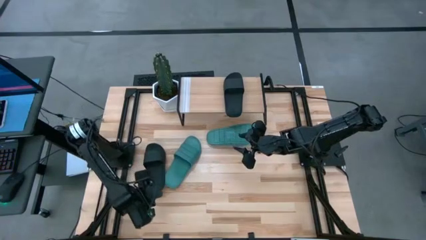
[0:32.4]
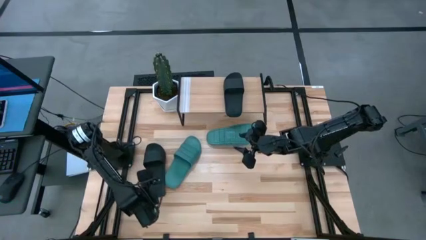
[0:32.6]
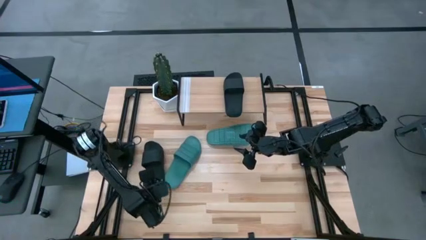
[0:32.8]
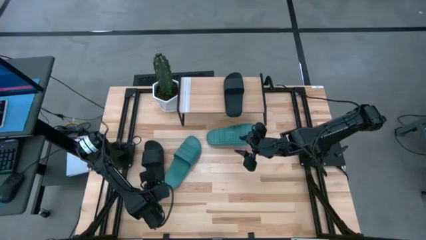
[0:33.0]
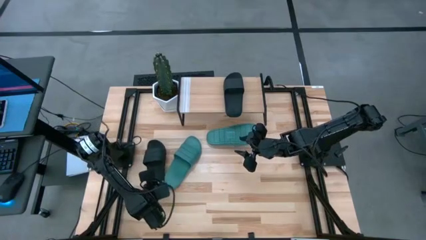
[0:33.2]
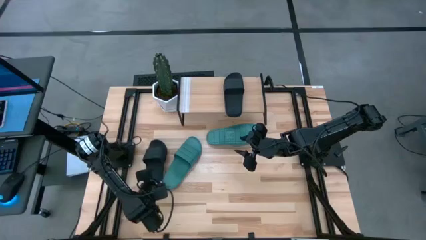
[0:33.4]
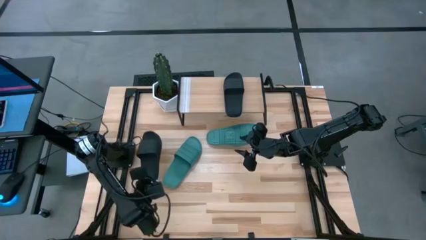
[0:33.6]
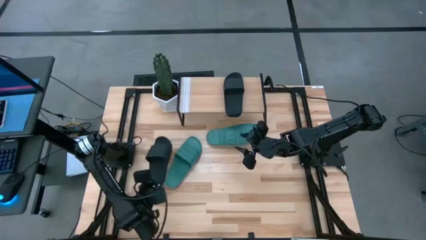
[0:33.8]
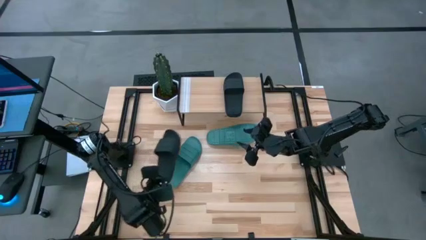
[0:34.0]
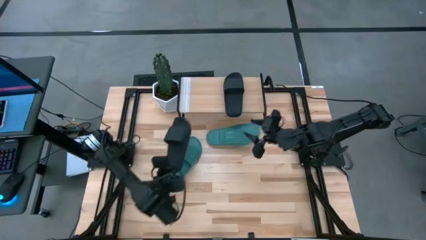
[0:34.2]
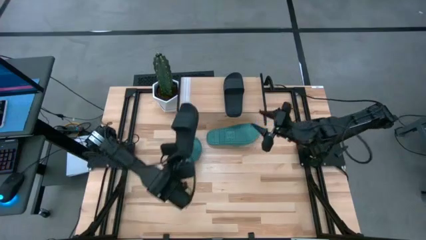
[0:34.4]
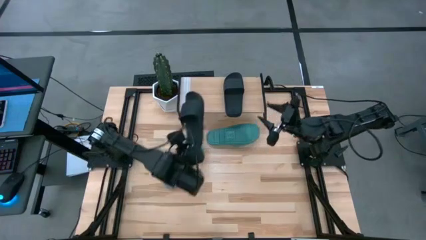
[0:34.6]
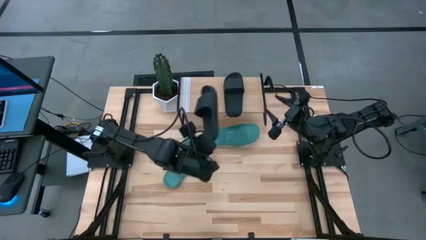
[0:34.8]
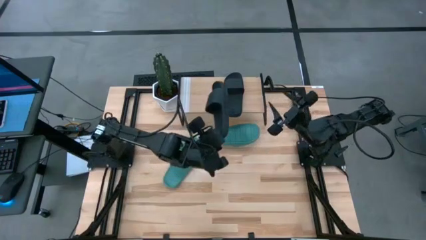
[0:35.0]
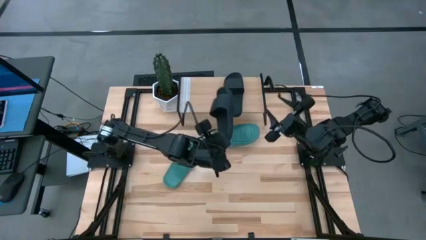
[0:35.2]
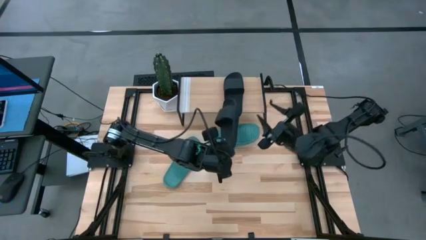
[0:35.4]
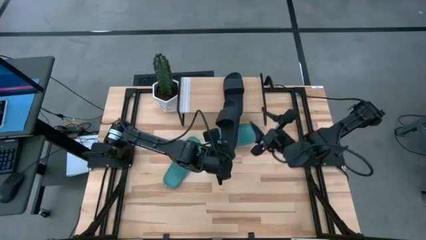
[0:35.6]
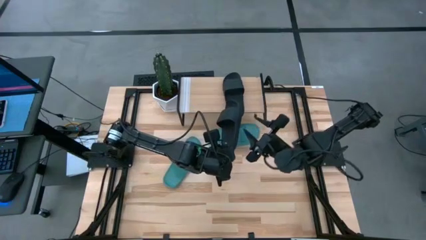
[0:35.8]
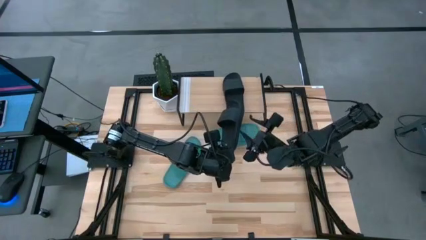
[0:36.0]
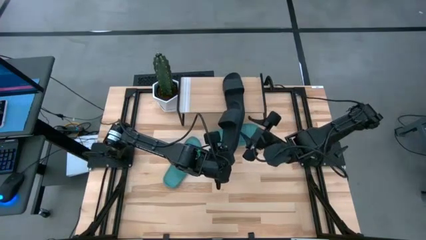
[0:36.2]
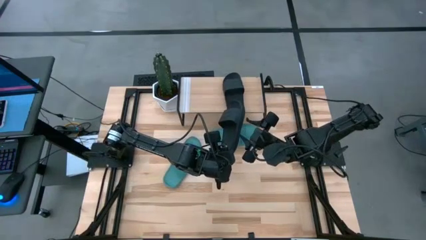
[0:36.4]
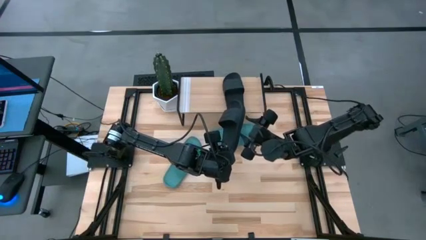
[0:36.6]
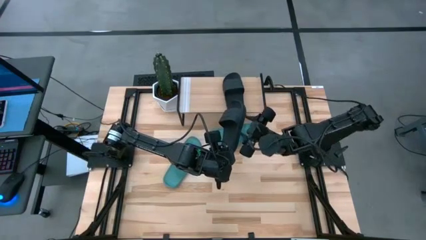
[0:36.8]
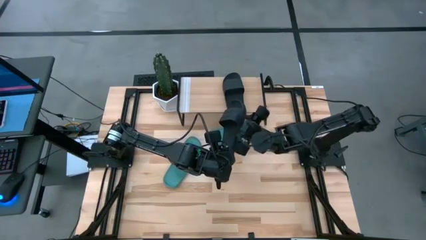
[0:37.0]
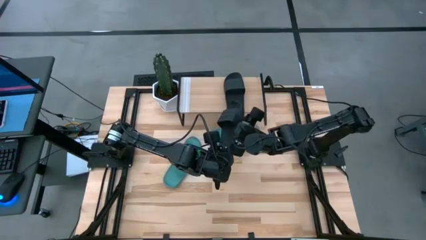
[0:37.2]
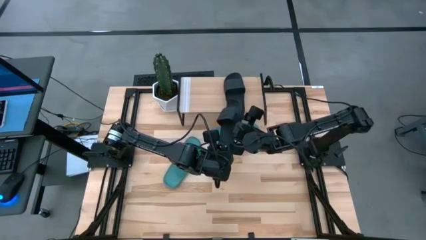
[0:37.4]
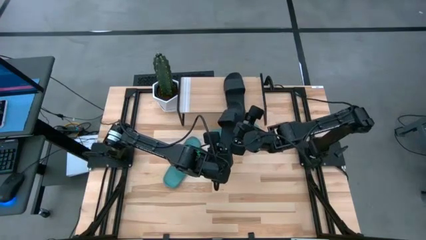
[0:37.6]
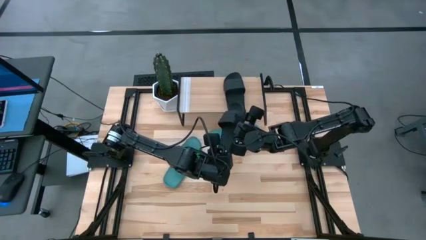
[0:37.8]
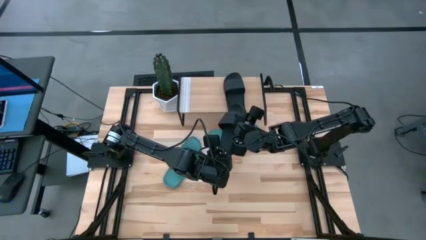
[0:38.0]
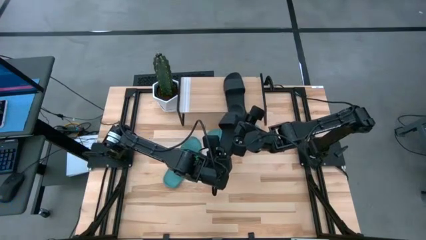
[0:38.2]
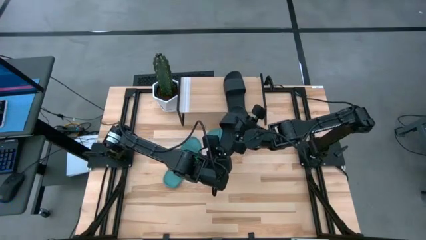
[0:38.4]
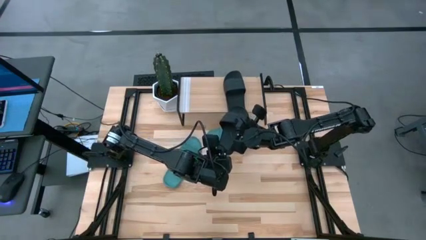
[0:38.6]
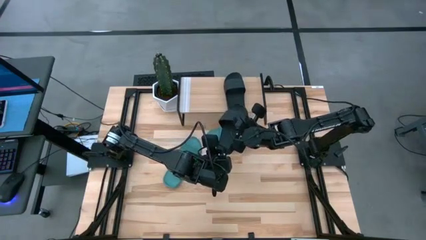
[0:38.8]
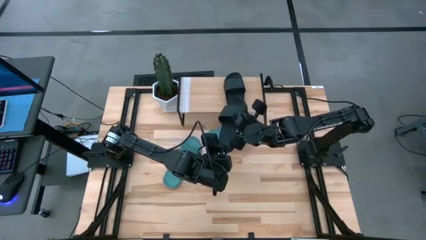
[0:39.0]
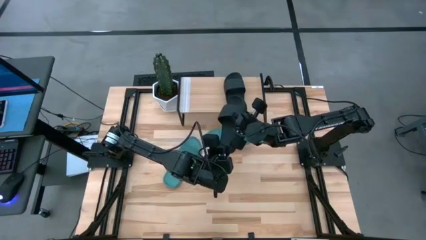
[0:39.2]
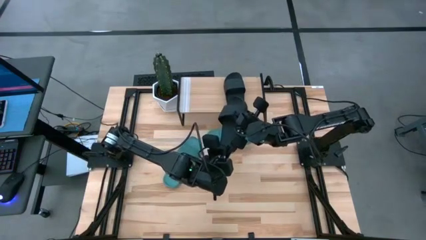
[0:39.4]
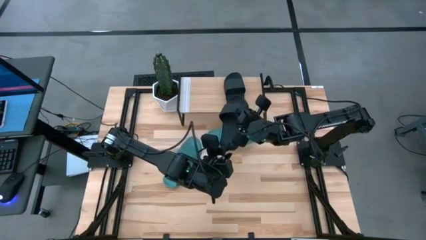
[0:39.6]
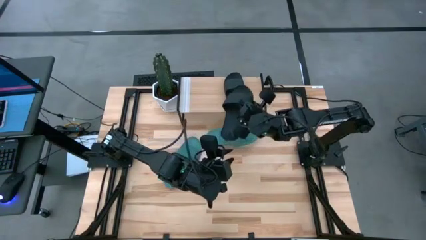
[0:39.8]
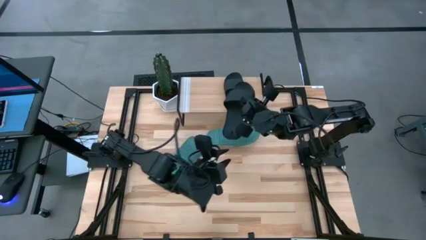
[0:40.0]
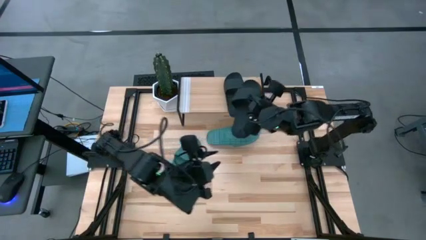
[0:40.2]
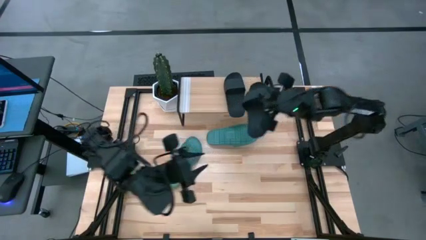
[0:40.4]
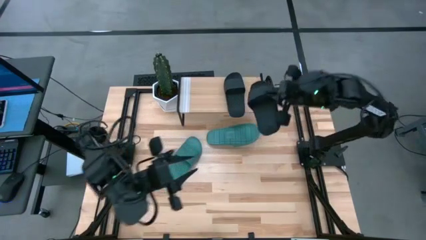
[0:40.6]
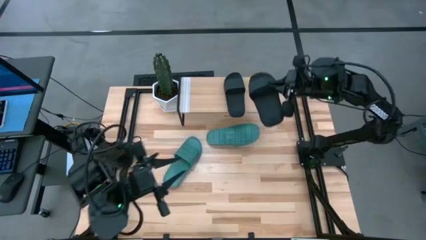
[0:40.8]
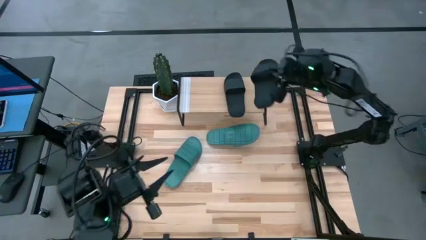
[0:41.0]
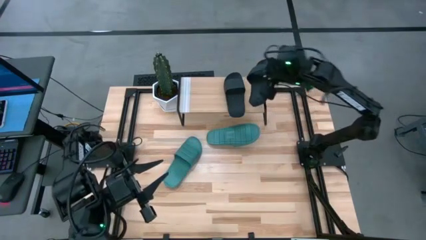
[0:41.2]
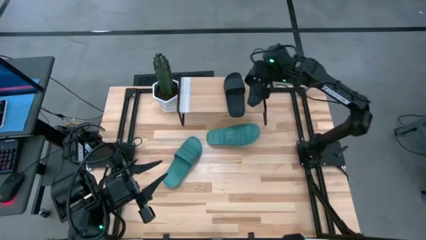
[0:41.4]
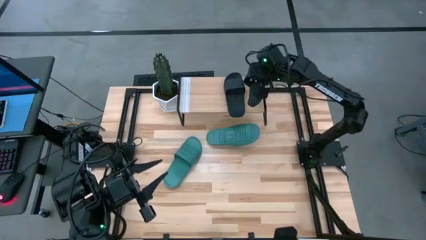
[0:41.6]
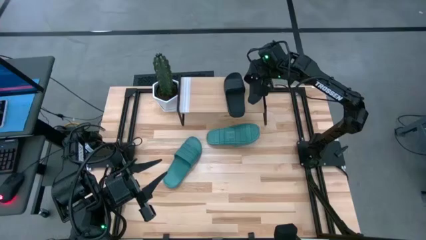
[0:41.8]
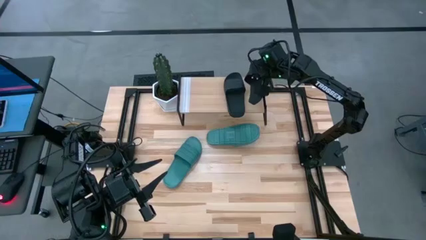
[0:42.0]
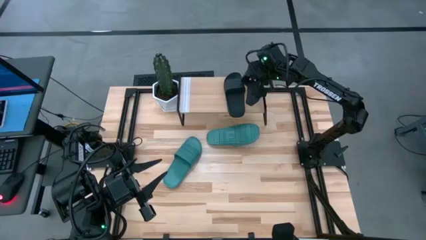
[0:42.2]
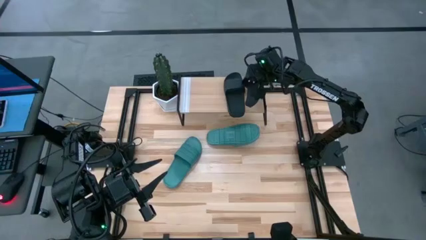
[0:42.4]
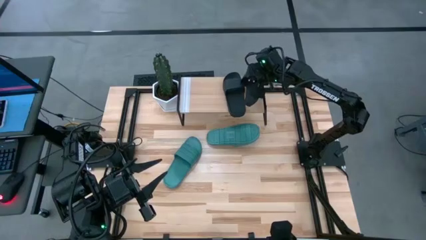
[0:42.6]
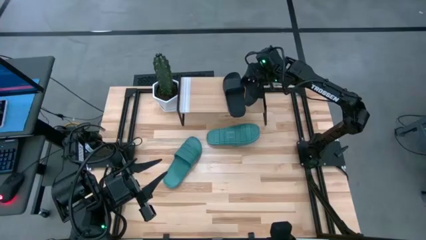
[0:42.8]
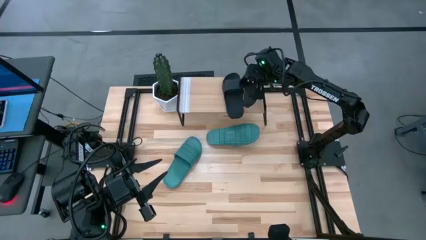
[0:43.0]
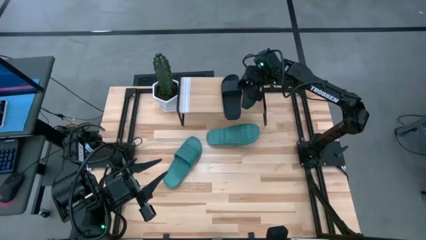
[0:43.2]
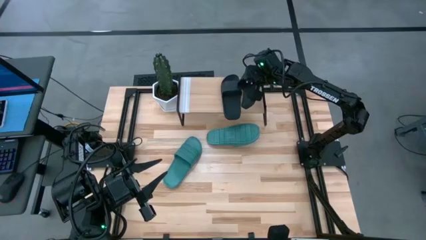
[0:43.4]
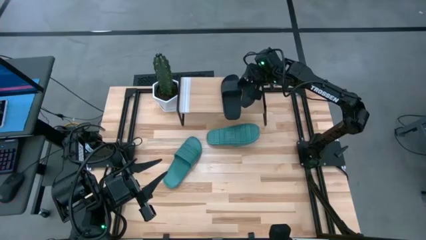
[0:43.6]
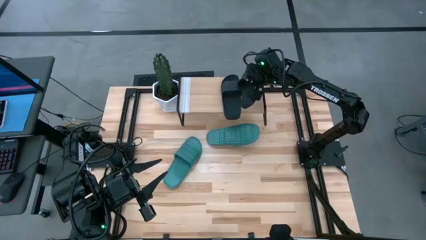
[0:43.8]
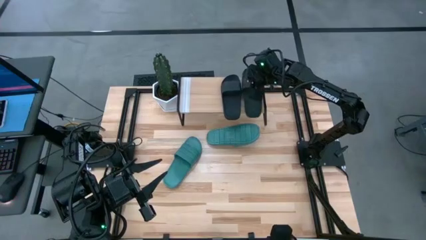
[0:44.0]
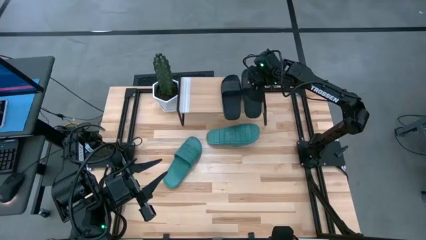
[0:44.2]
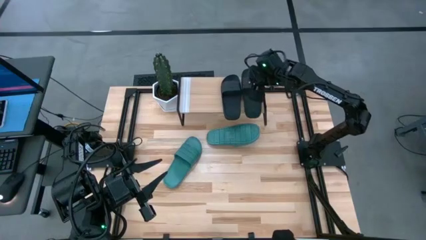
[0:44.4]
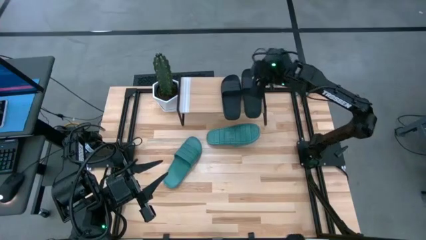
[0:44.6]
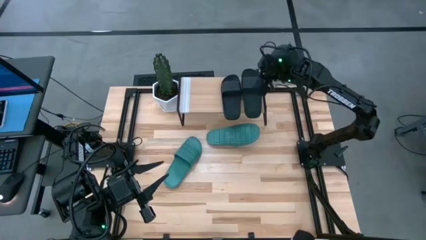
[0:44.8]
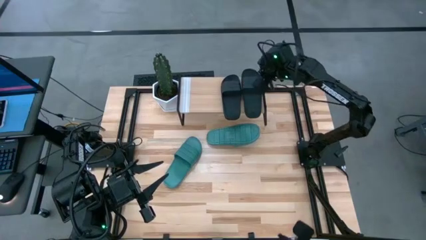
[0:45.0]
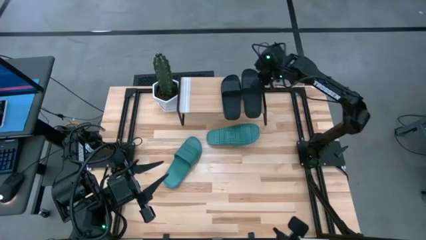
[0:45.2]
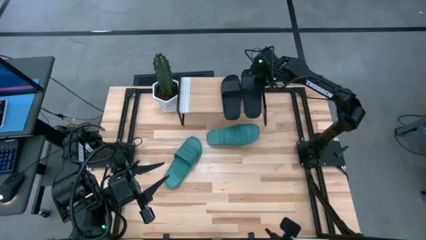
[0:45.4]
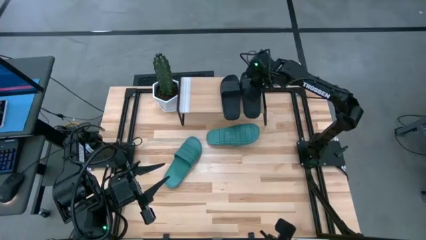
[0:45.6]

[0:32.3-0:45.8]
Task: Pick and place slides into the shelf
Put the black slipper on the shelf

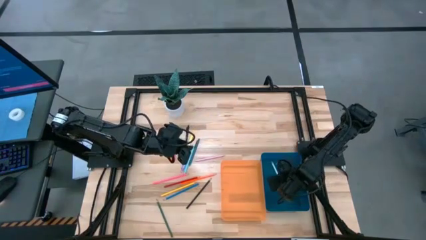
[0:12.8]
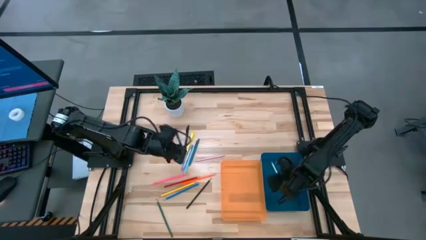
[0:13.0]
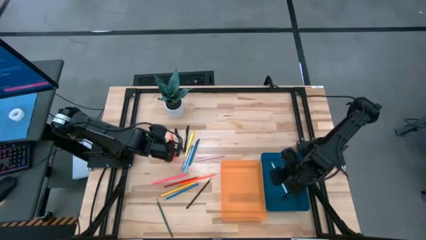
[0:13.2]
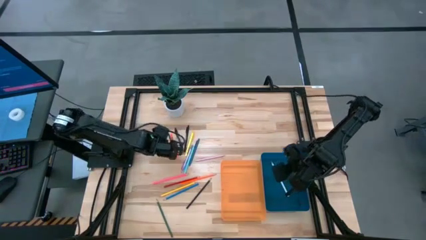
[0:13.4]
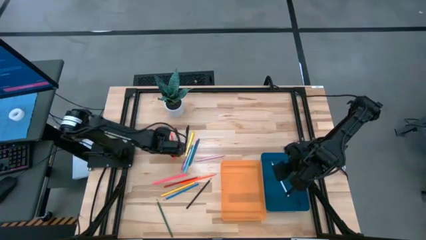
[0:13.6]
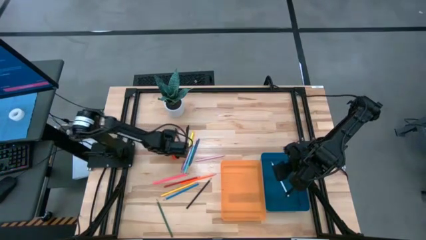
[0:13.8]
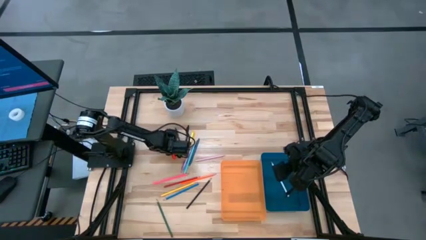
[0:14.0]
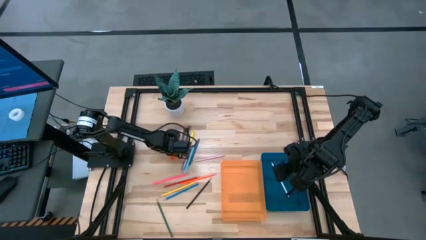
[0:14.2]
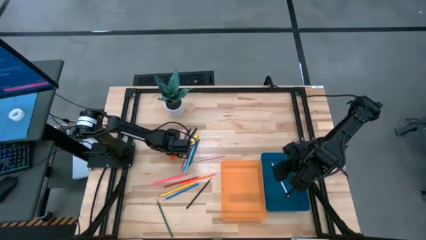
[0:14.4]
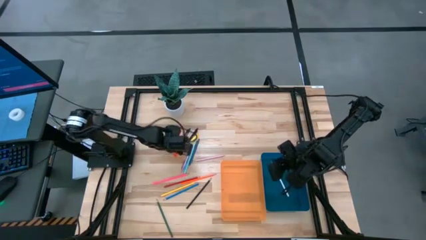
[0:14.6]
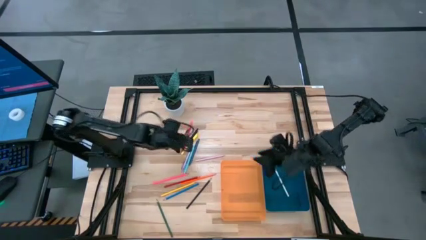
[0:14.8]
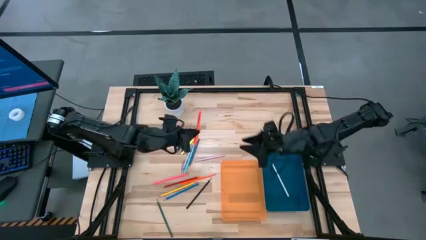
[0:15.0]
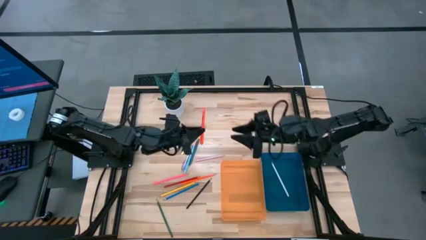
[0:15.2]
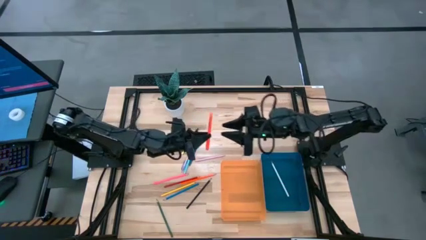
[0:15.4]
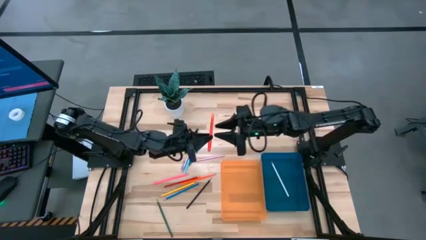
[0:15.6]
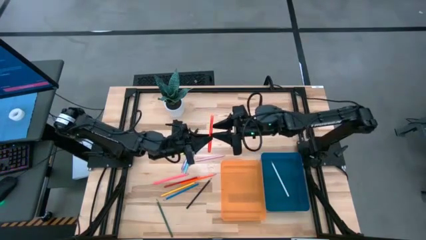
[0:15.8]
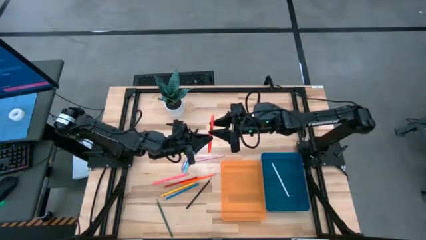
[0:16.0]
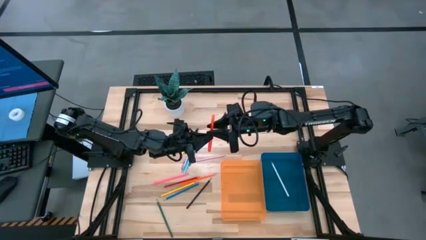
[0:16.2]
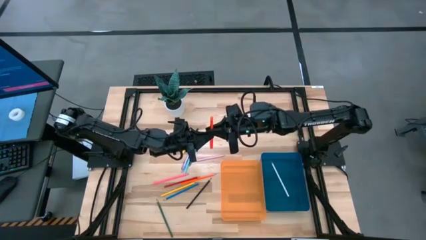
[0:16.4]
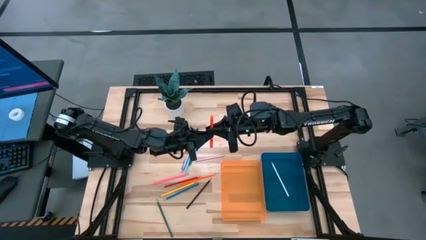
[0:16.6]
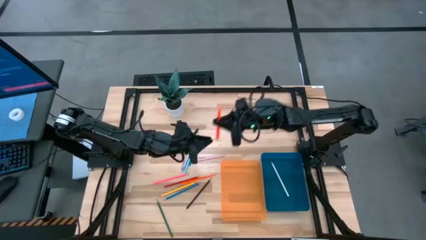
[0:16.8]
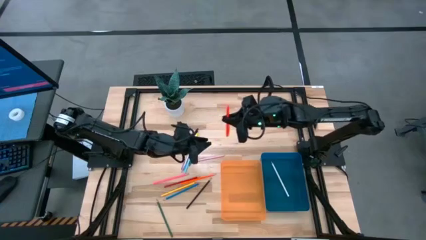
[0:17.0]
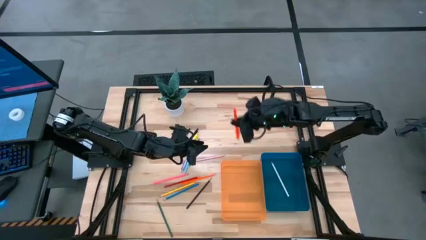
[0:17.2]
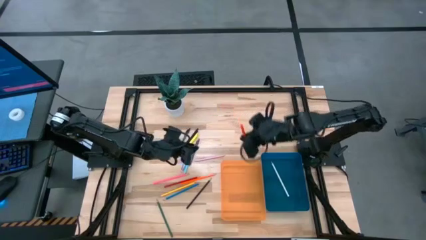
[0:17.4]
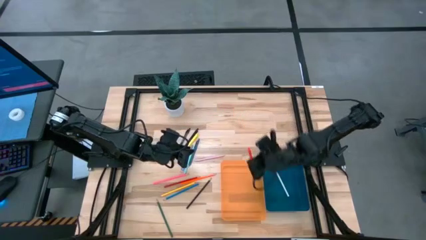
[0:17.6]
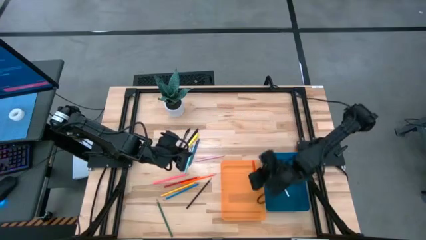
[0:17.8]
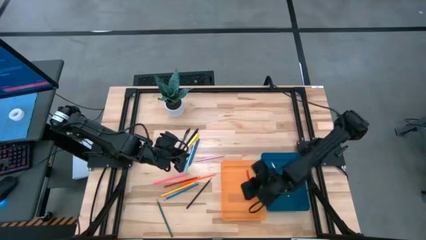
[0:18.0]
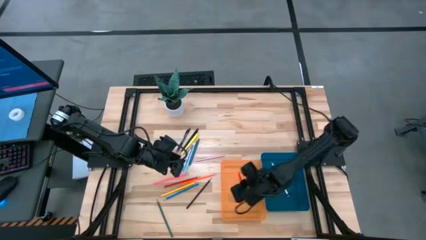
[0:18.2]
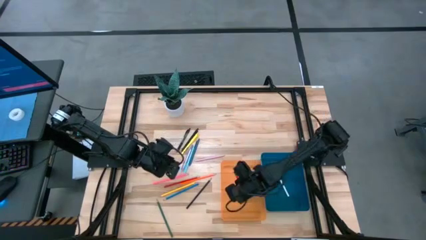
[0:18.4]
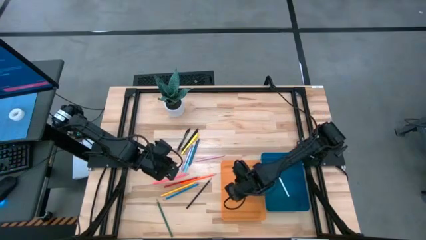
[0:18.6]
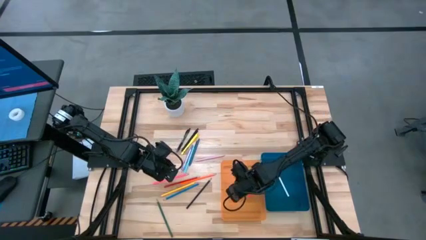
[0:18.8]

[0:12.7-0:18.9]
Task: Sort pens & pencils
Put the orange pen into the orange bin
